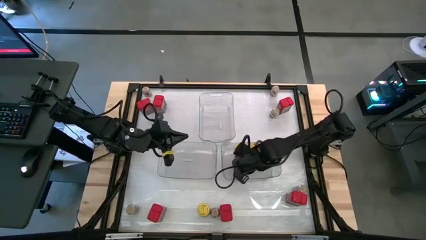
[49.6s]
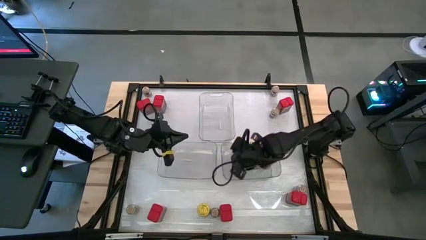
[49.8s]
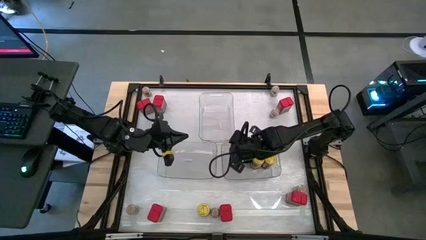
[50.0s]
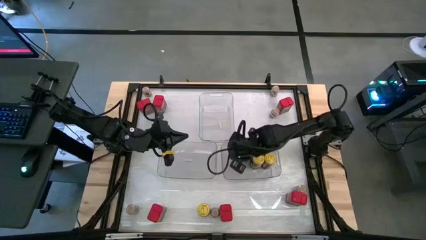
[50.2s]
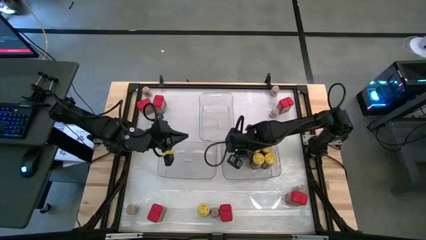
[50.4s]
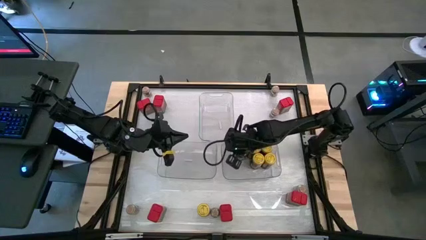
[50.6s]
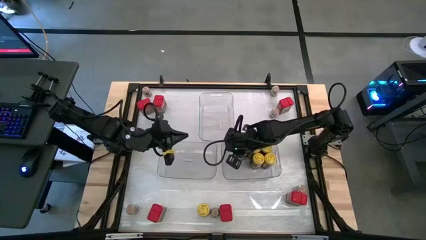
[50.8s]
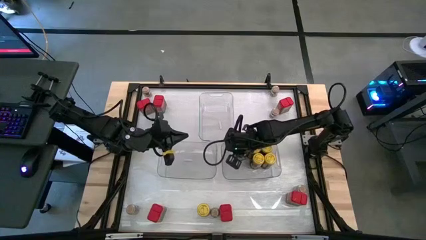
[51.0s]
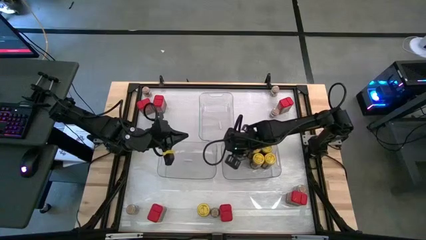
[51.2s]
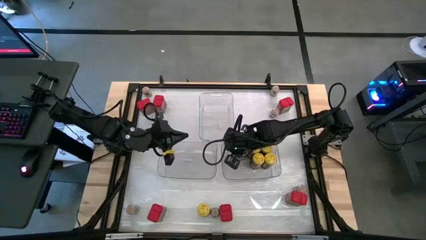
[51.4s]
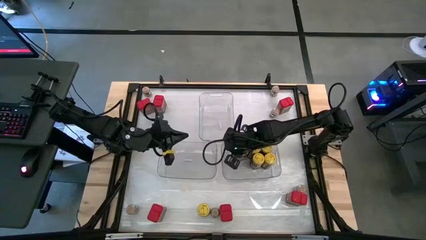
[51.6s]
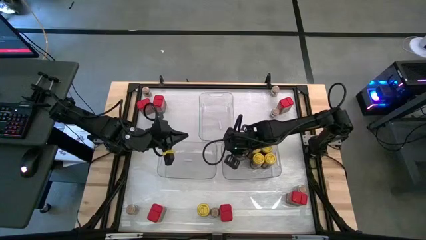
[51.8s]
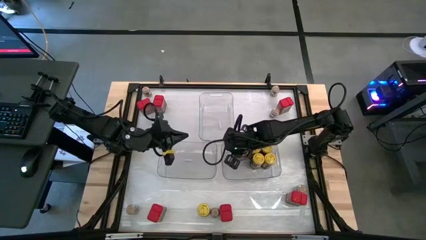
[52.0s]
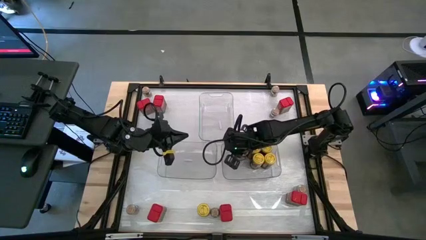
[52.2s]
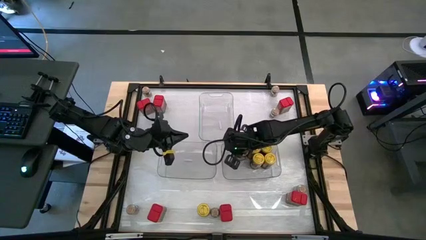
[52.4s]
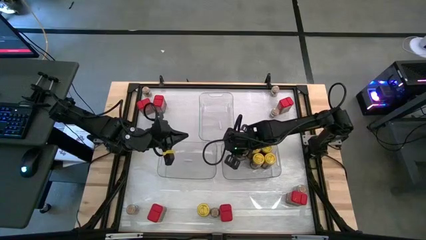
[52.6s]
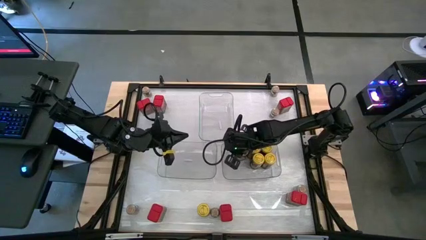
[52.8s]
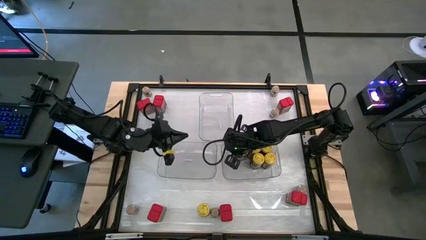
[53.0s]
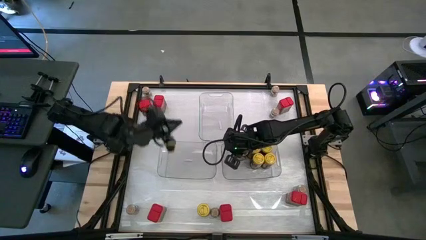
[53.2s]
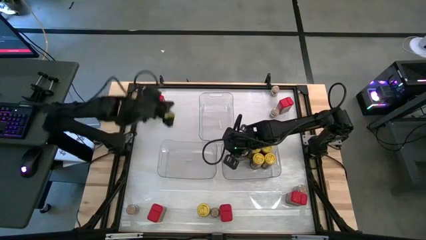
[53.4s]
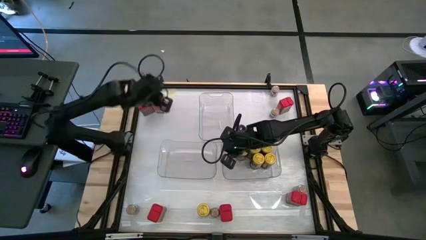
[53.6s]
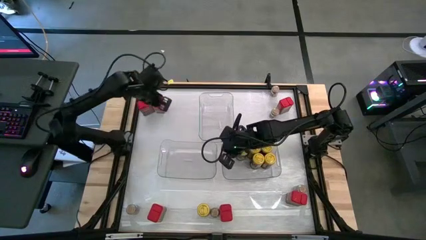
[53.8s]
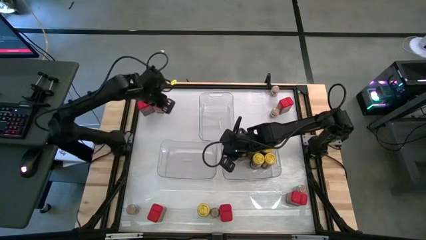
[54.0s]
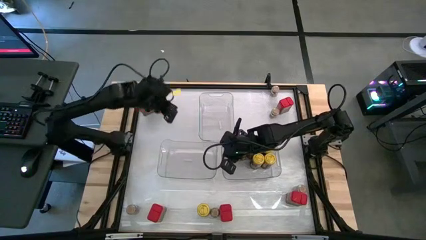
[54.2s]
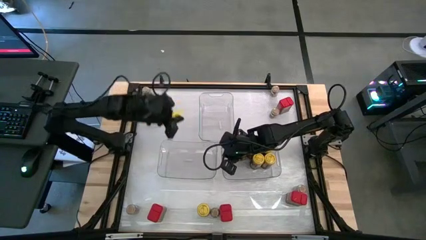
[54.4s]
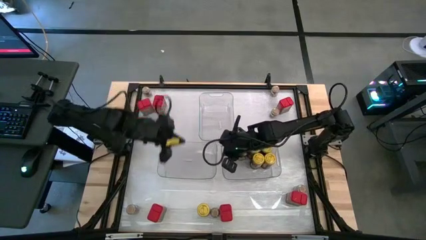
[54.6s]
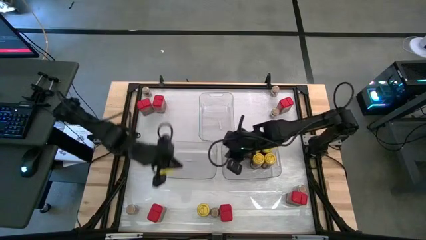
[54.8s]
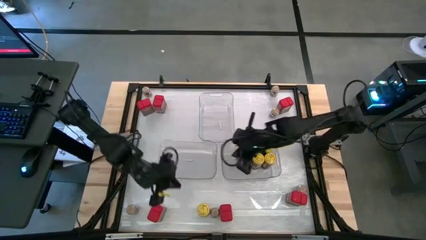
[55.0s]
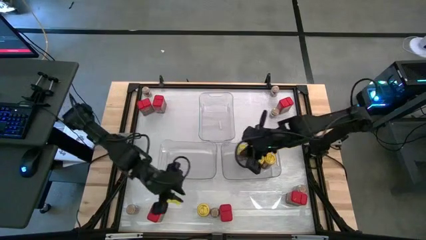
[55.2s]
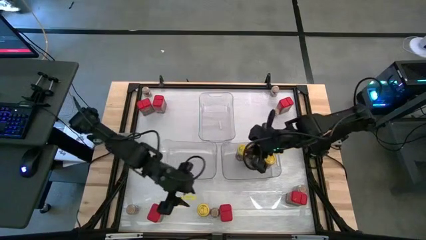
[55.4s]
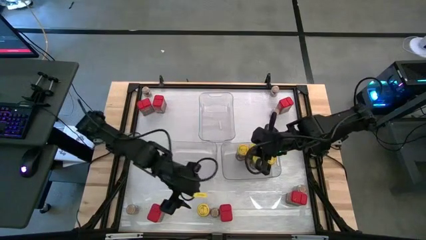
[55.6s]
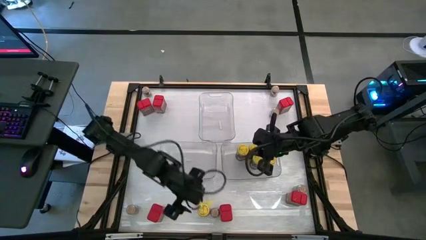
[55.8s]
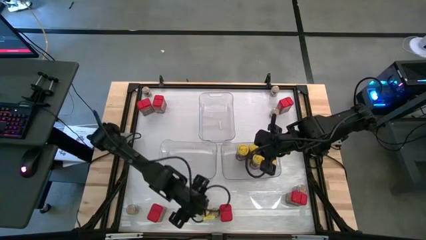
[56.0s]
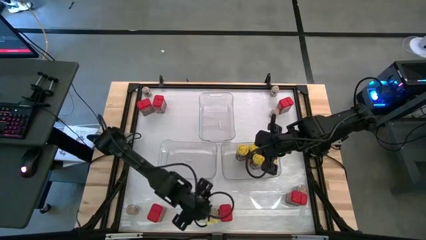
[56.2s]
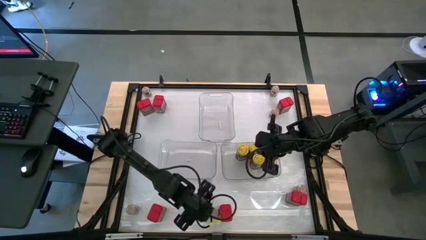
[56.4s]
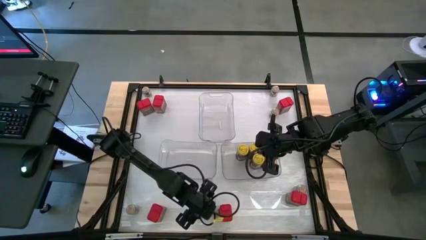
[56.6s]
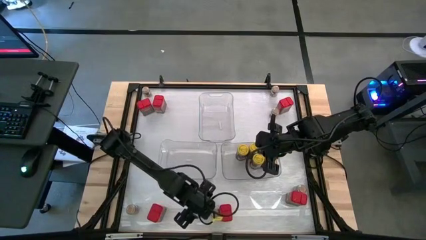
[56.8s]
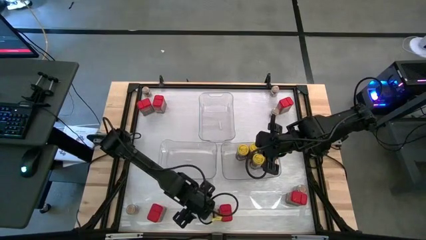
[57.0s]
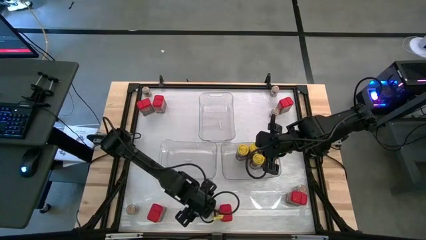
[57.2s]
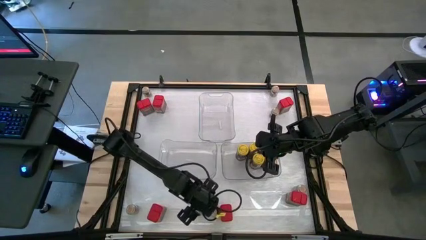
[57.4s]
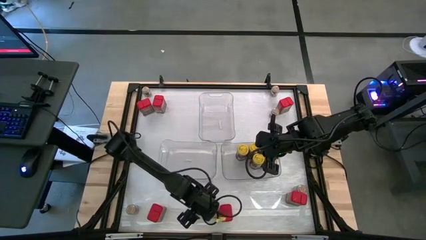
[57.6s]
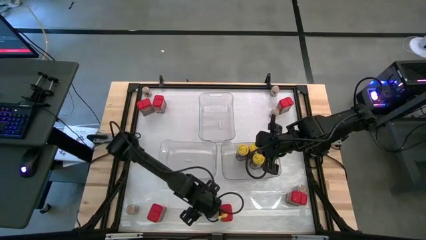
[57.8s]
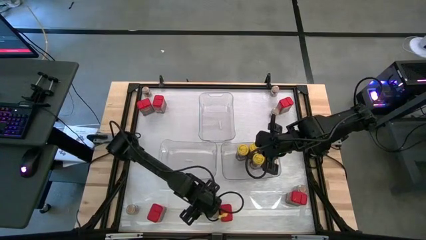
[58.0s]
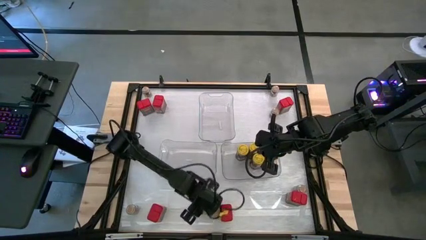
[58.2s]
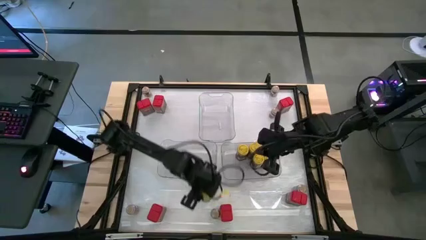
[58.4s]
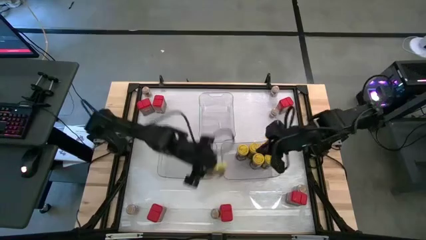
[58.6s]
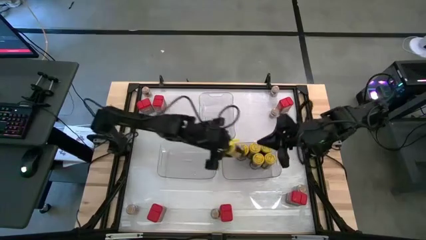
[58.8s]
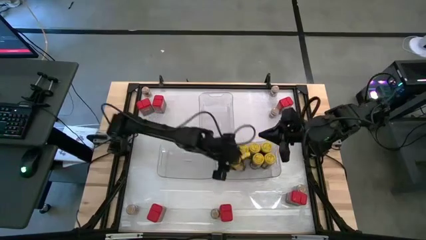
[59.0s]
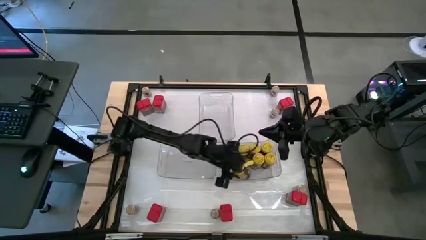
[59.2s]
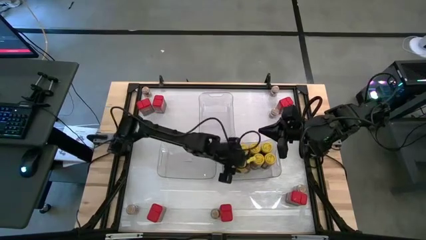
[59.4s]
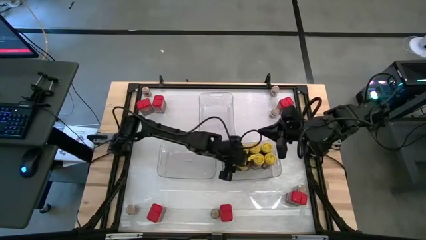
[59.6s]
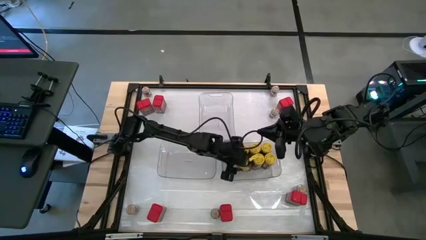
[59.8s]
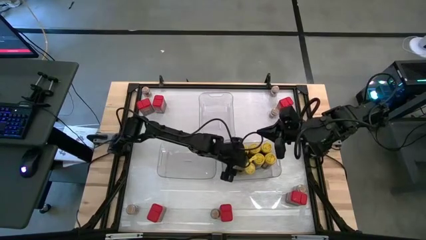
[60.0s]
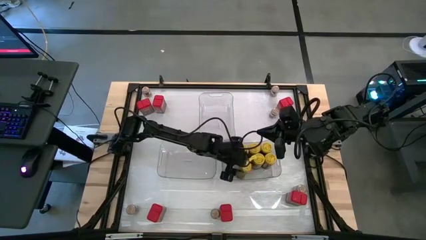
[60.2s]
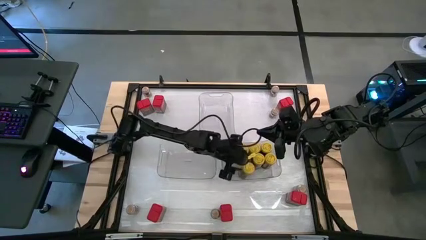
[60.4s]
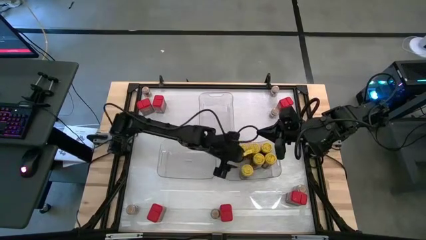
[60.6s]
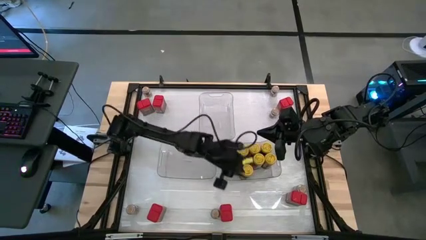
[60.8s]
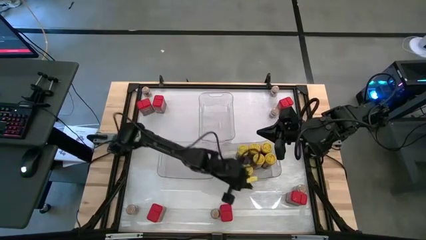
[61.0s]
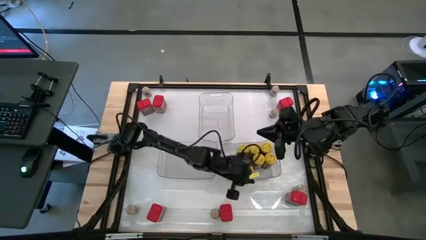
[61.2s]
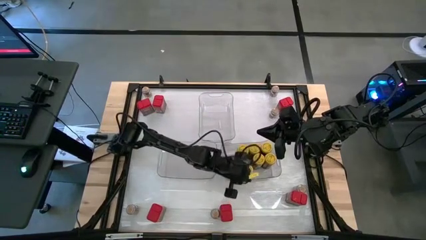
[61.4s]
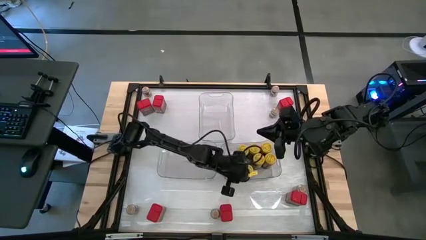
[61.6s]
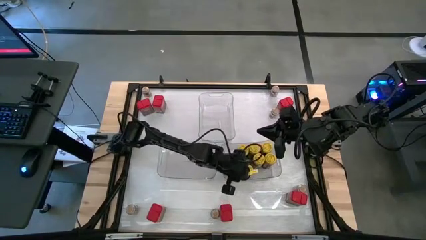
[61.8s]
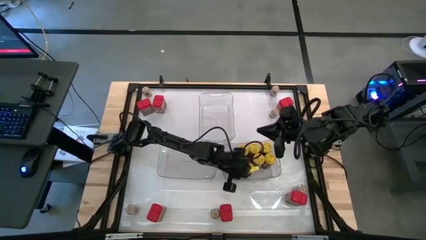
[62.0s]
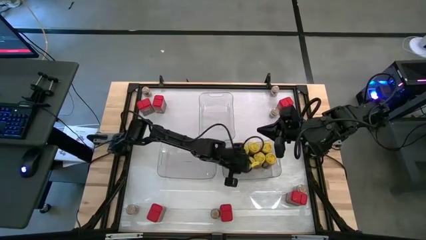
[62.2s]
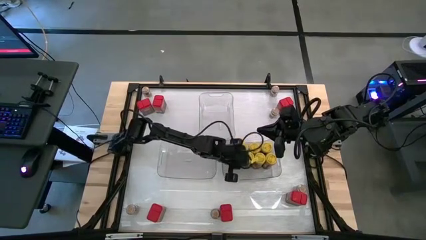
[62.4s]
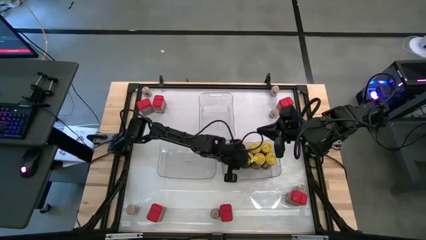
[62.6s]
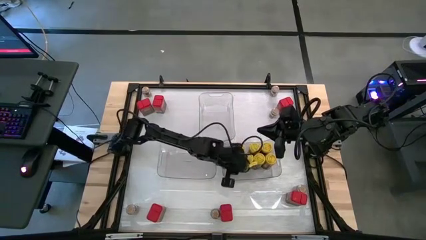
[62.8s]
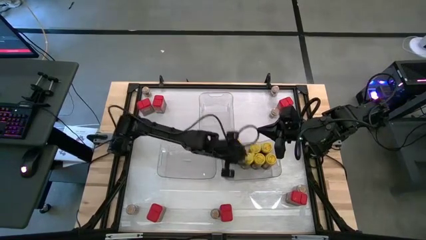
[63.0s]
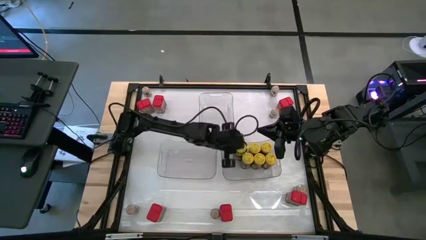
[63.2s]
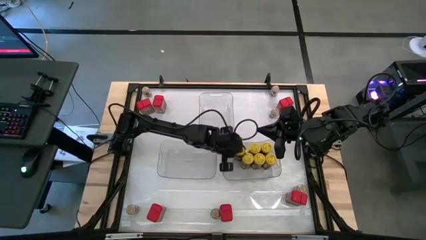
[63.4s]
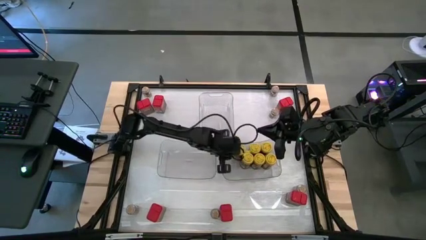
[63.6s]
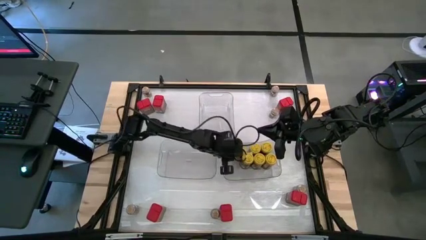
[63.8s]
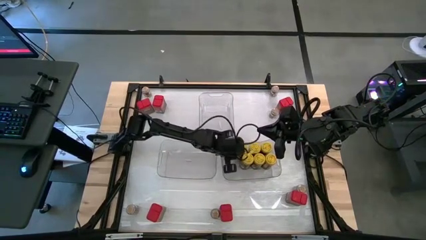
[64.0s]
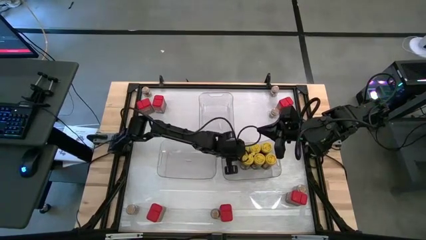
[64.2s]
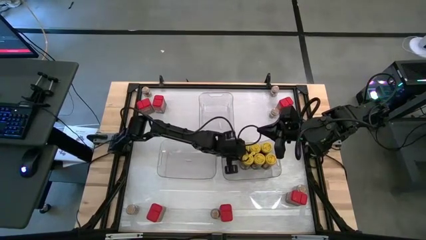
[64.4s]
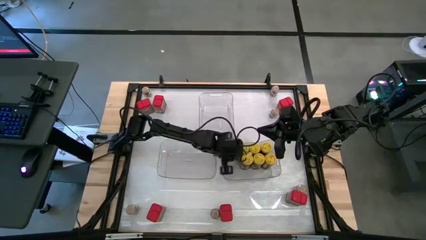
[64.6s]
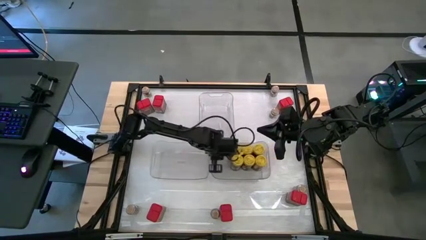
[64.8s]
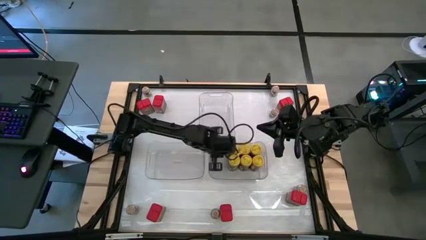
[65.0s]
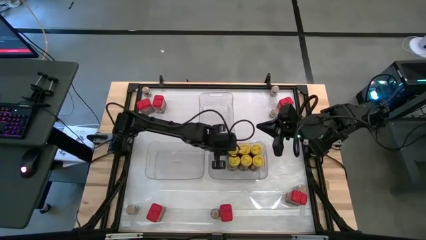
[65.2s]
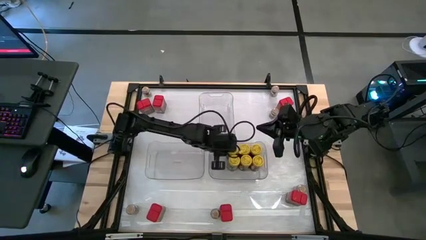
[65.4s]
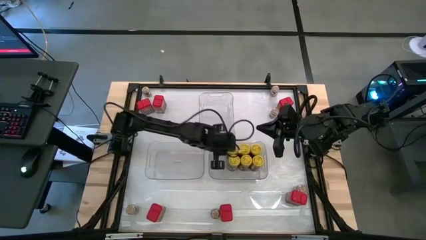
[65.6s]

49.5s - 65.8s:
Task: Sort spices by type
Put the yellow seasoning bottle into the bottom right transparent bin
